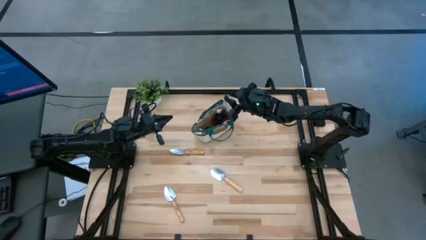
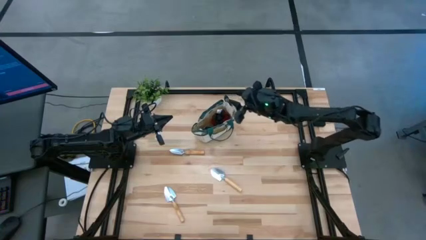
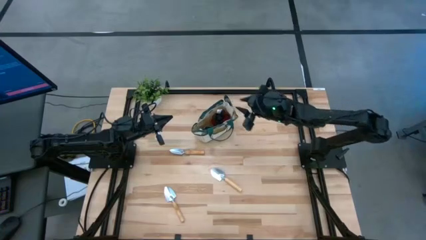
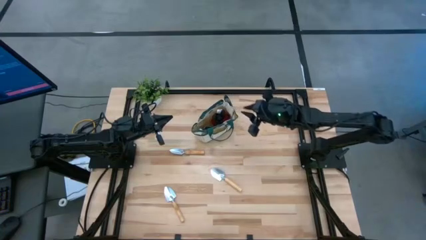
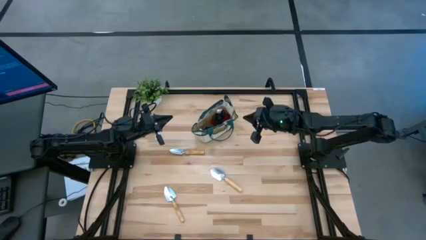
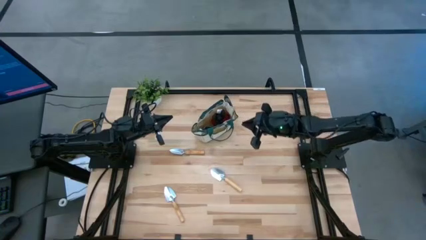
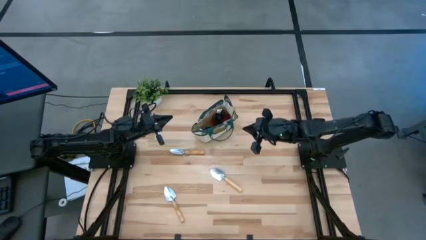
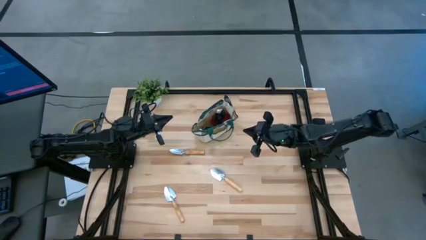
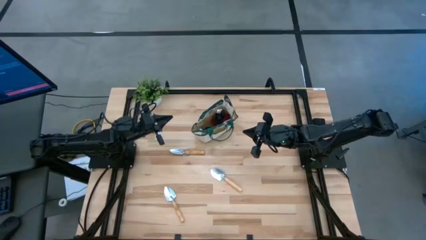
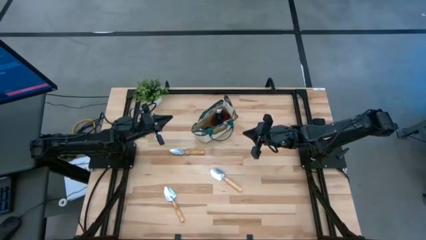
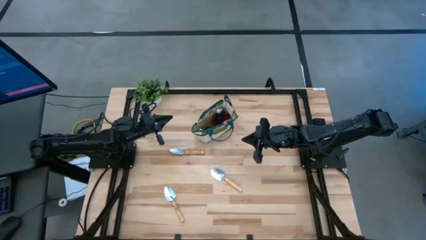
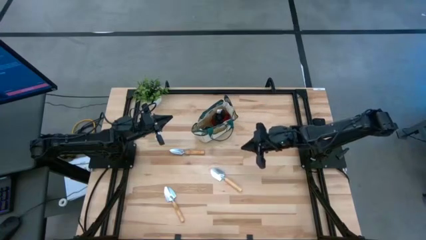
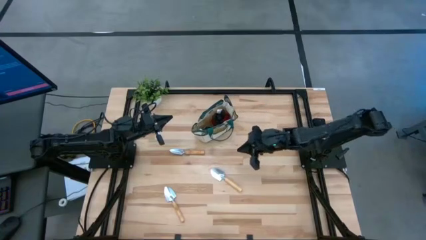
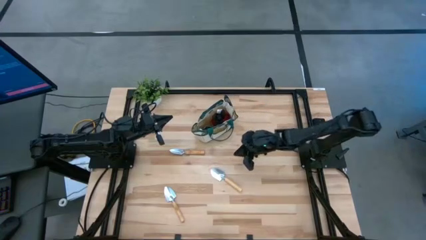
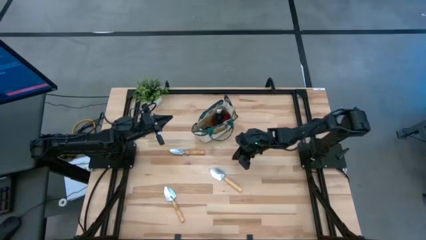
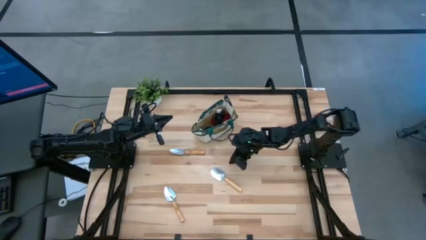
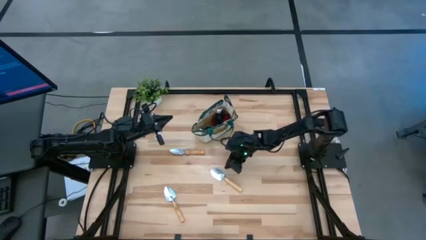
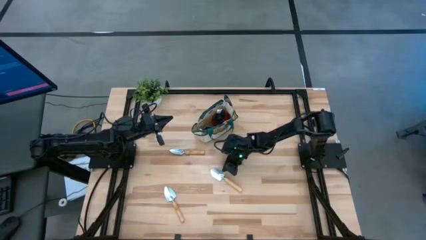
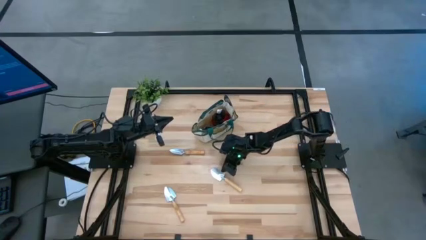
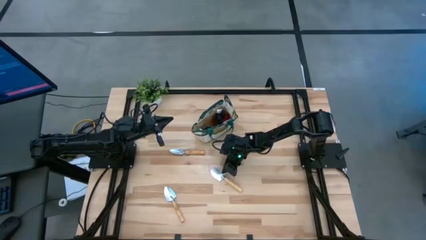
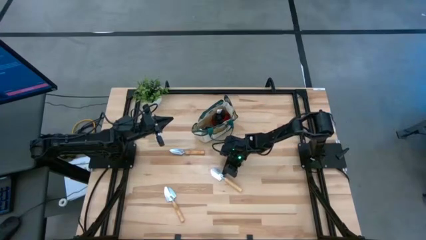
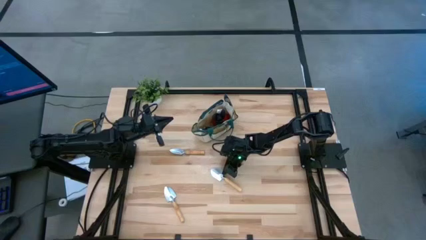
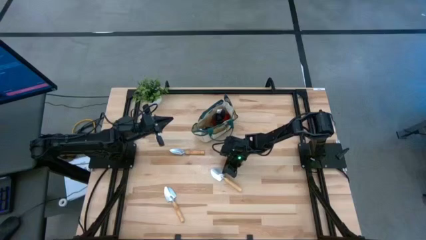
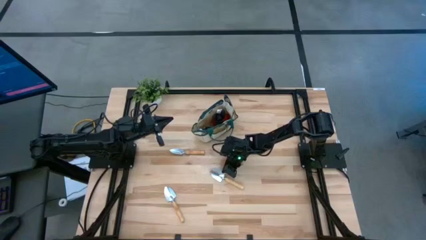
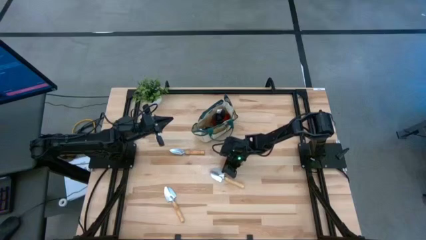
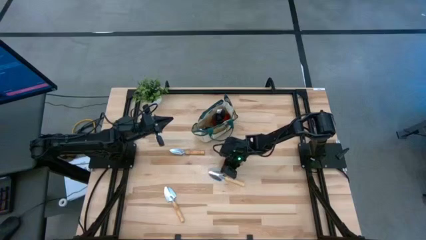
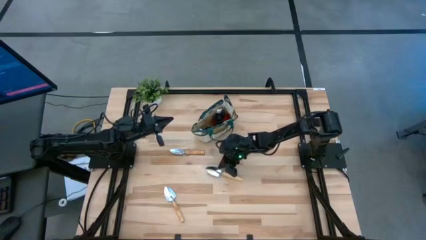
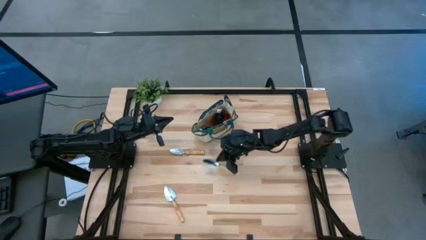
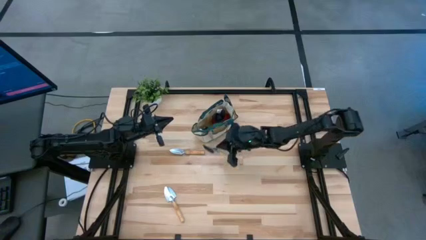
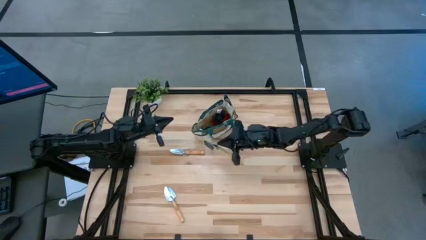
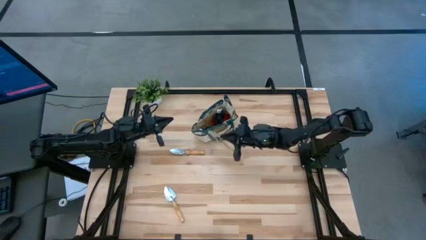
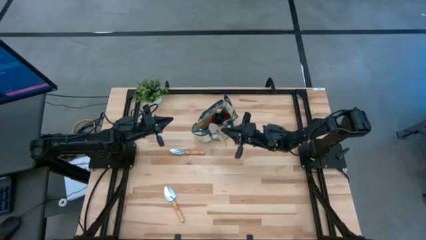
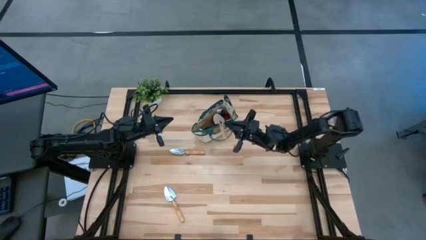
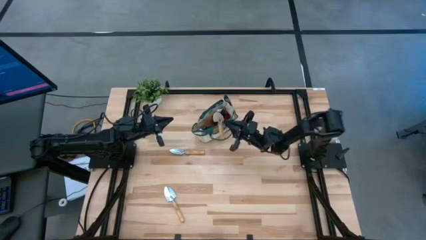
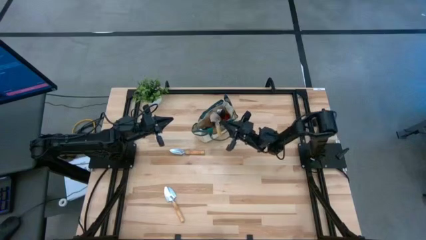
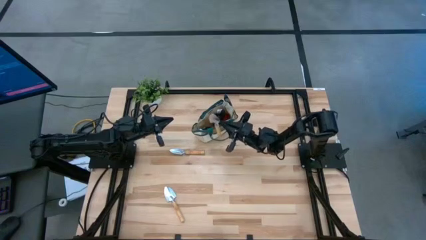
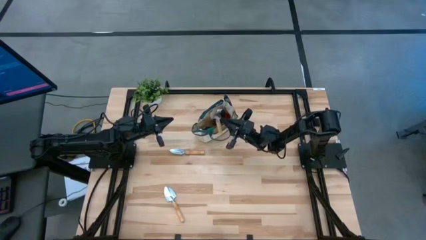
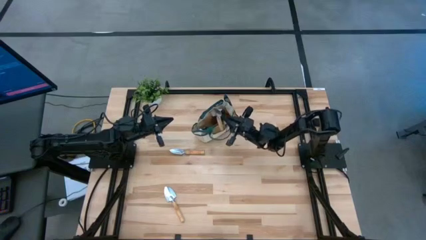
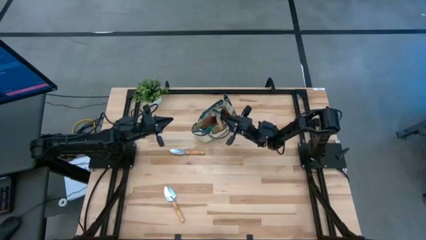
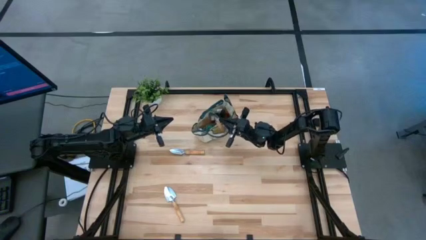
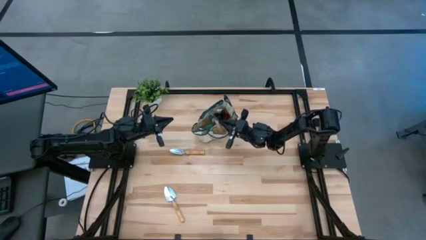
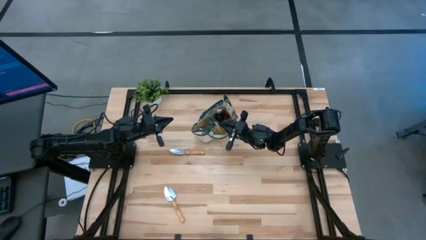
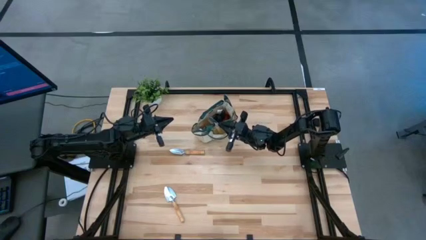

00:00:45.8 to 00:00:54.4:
Task: Pick & Place Garden tools in Gardening bag
Put the trowel into the gardening bag

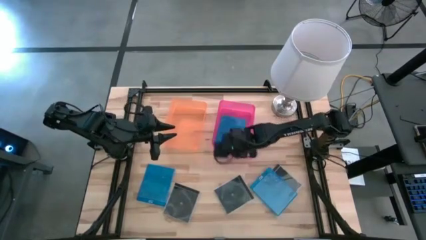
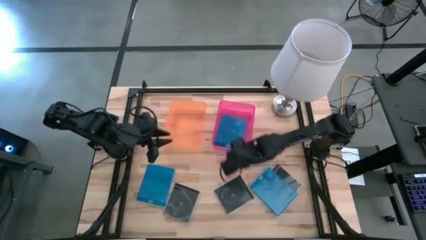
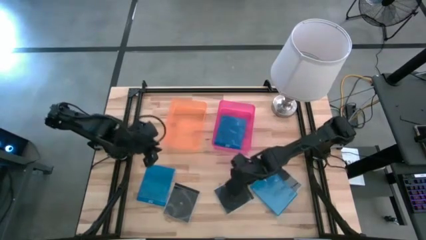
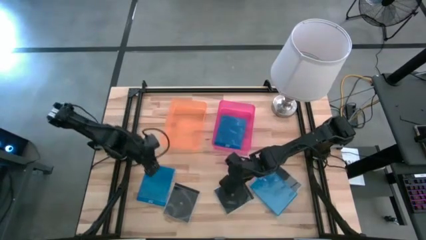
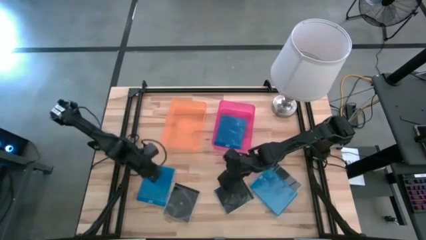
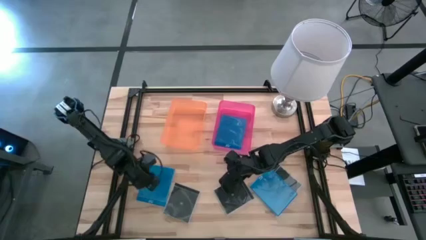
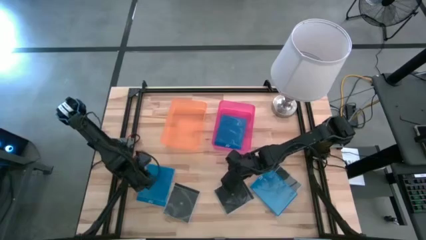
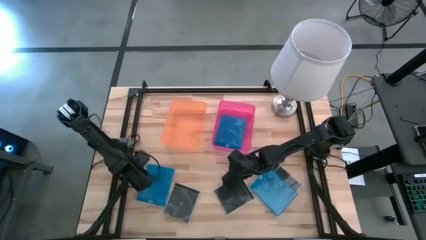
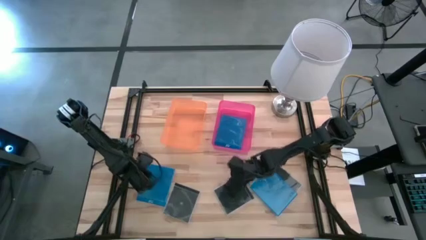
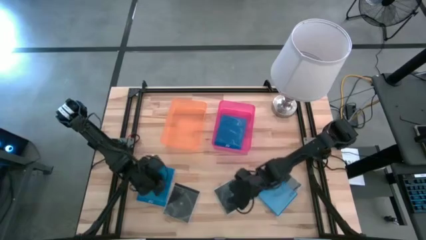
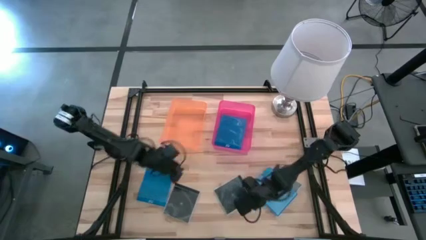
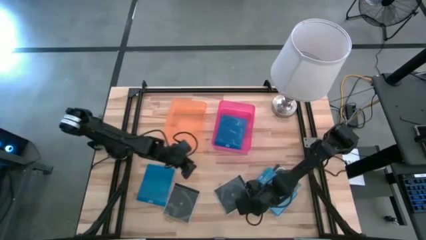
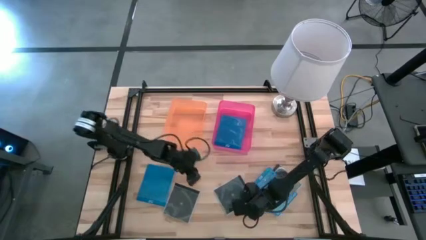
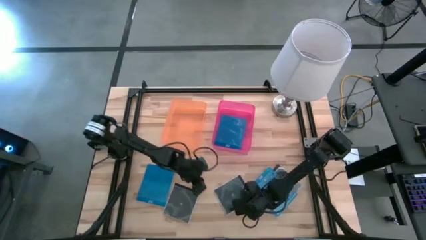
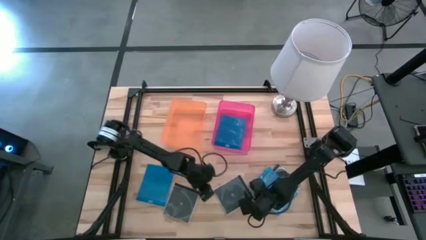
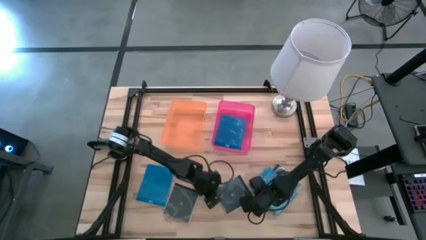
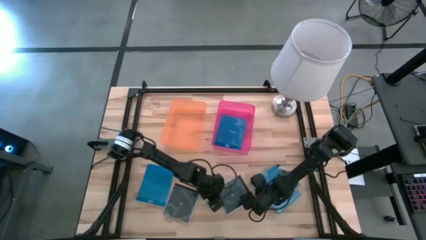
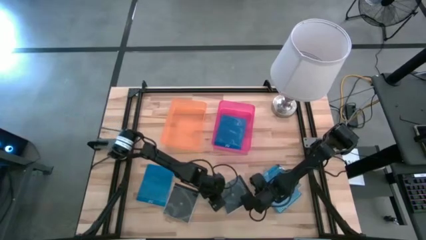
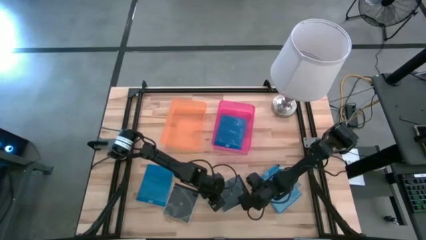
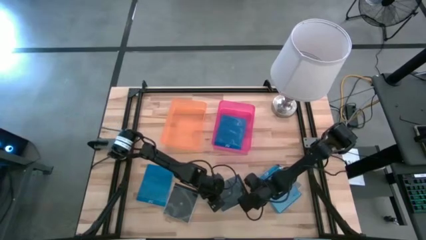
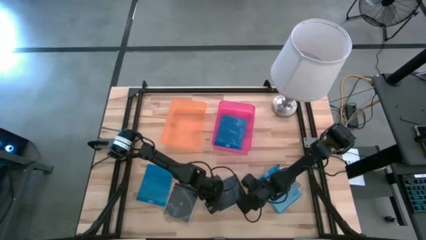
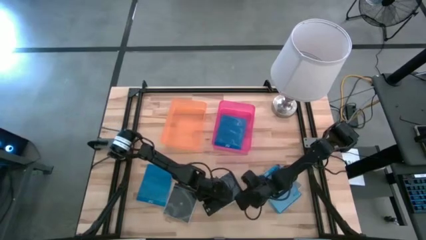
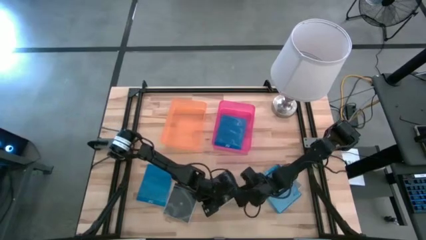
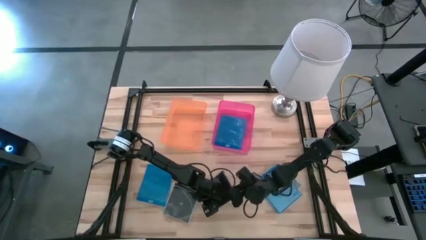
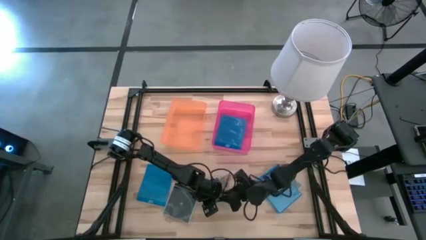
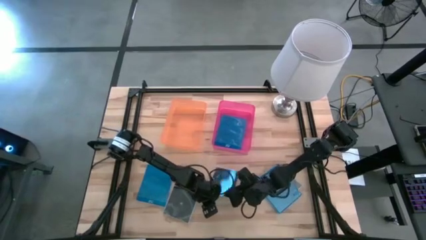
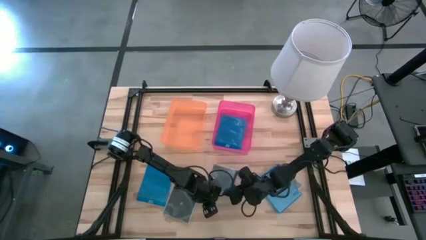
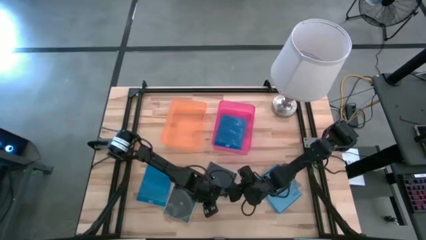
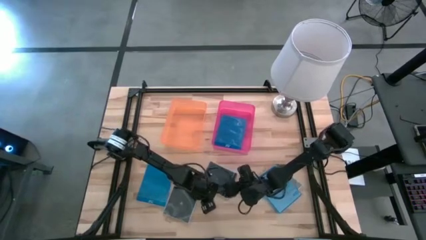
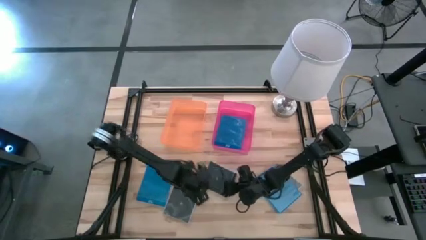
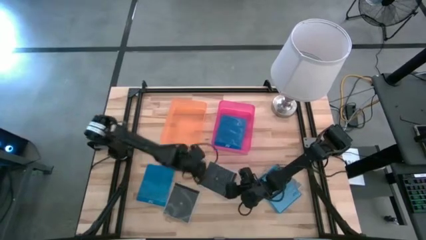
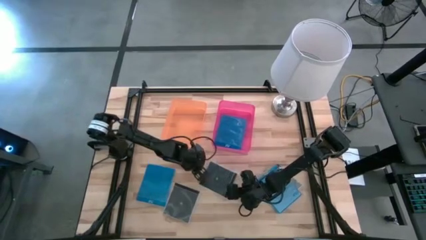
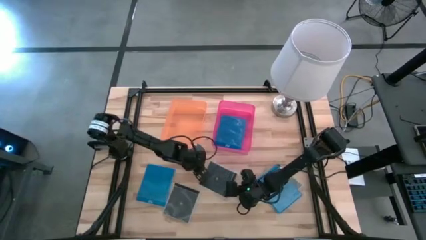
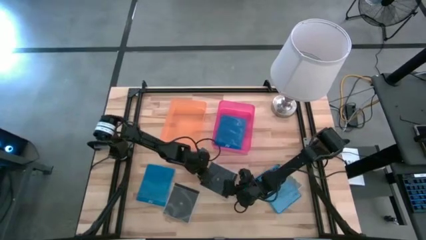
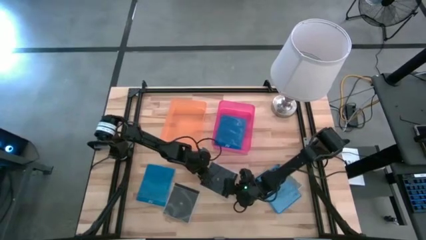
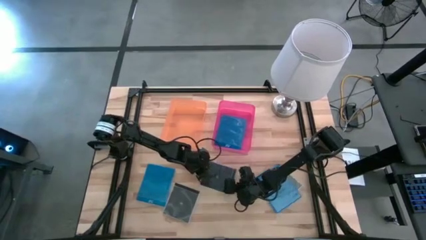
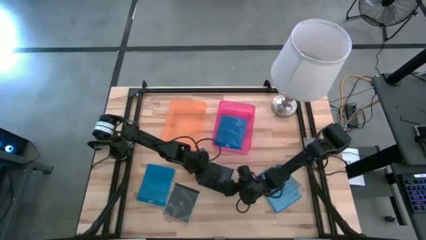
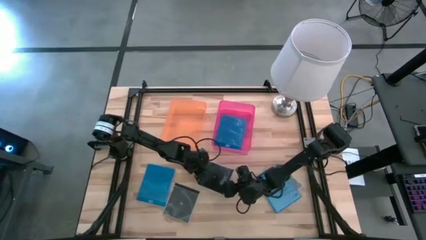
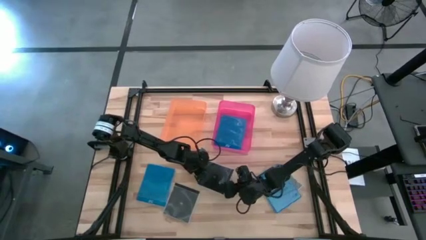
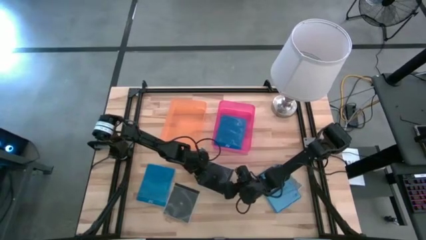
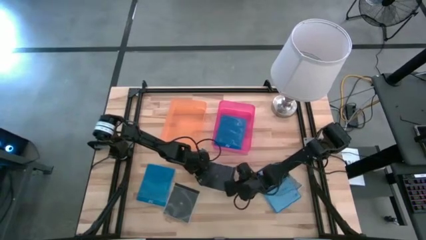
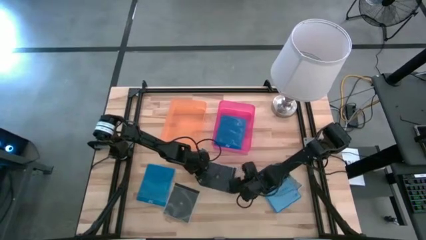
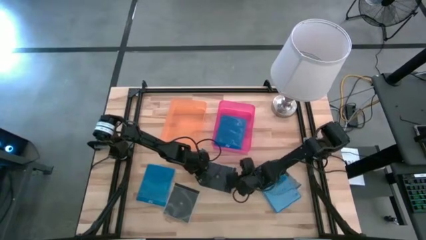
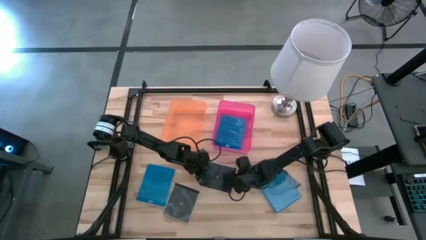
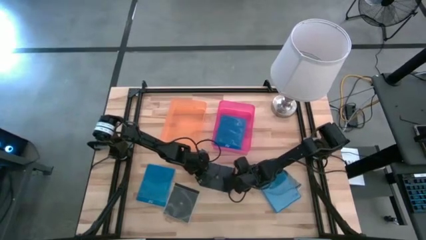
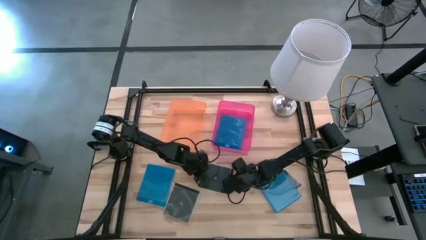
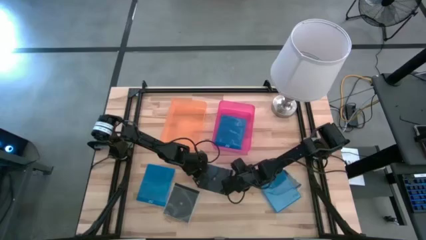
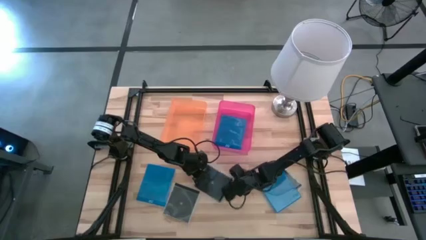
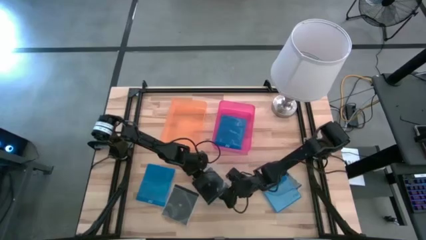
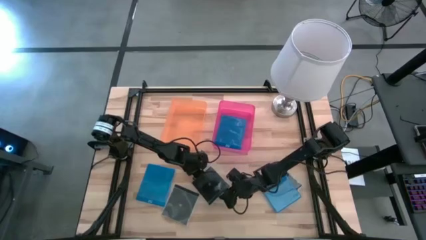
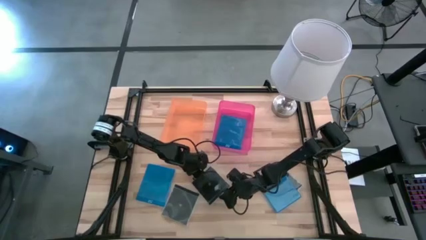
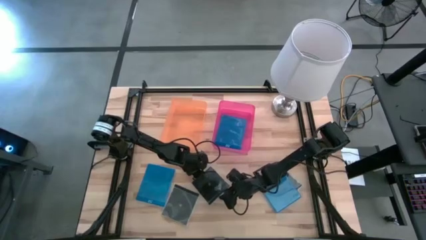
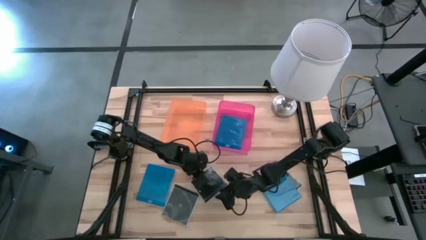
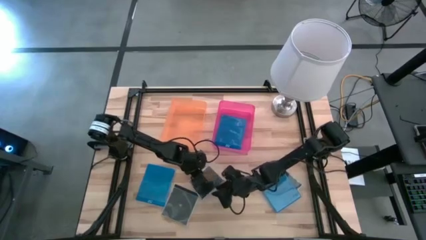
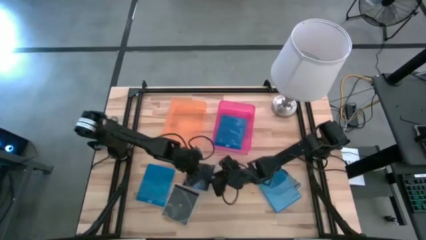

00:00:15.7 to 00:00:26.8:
Task: Pick & place jewel cases by type
Put the middle black CD case into the orange bin
